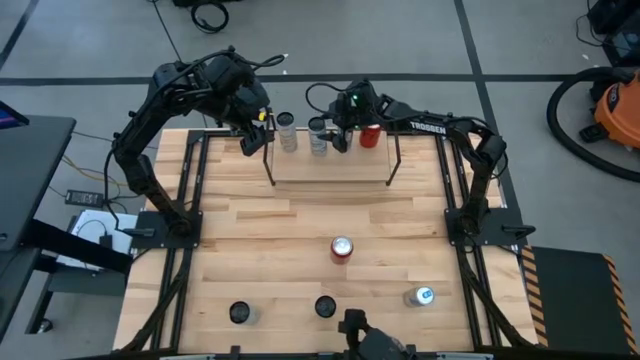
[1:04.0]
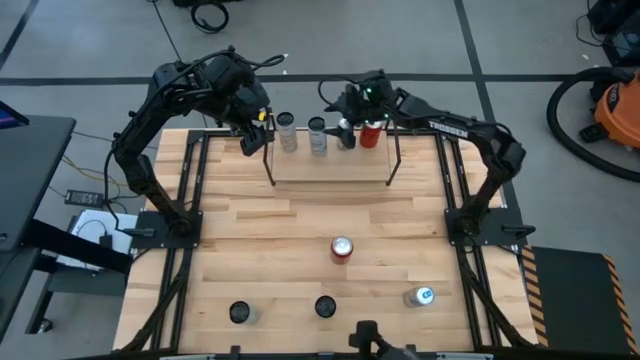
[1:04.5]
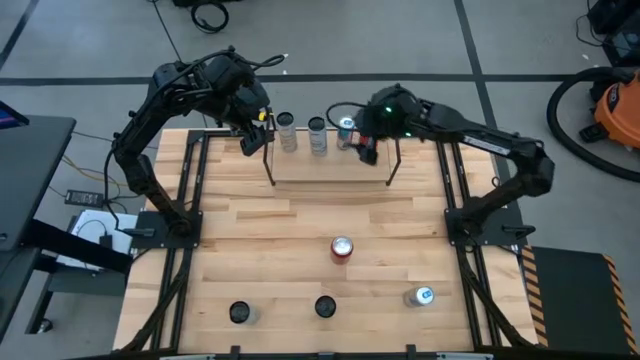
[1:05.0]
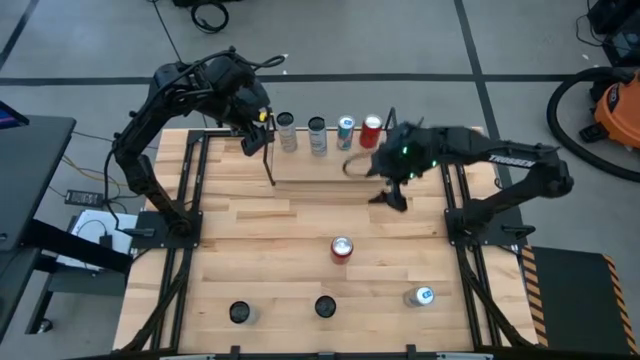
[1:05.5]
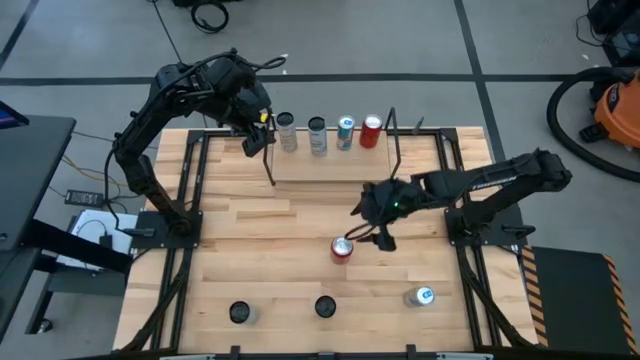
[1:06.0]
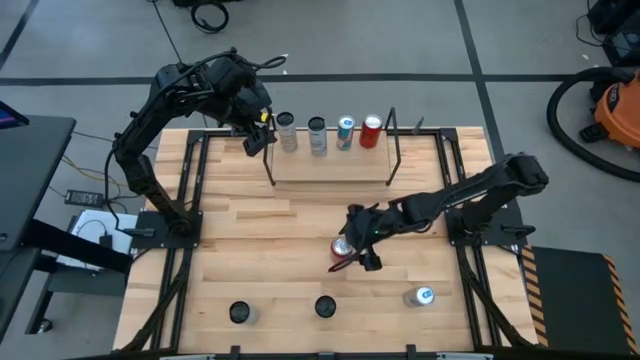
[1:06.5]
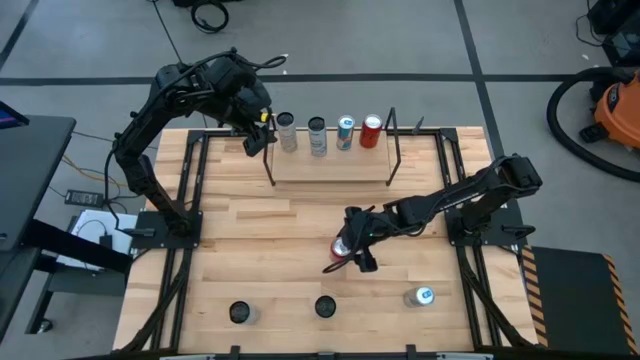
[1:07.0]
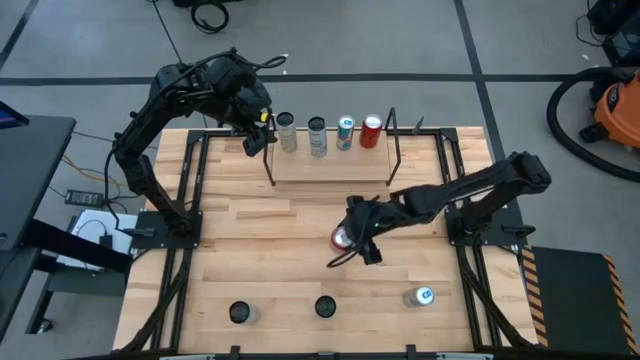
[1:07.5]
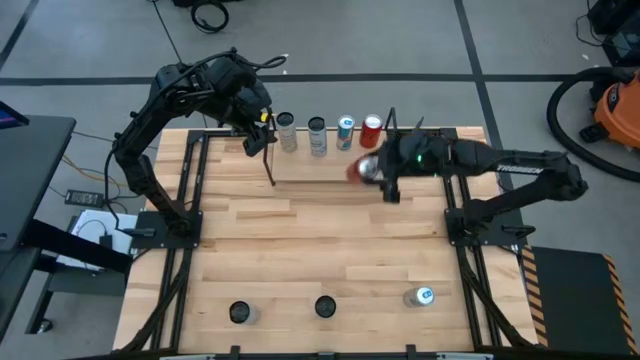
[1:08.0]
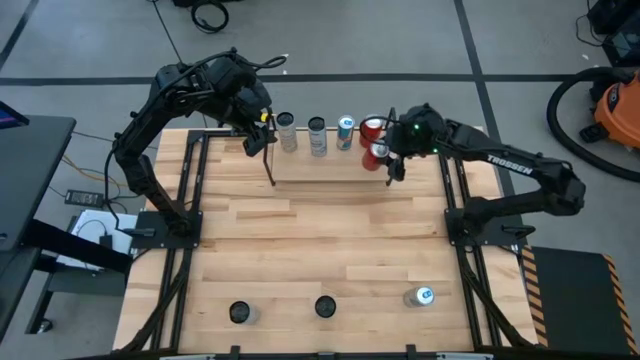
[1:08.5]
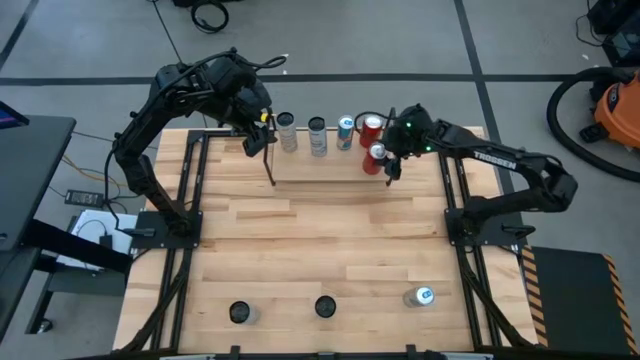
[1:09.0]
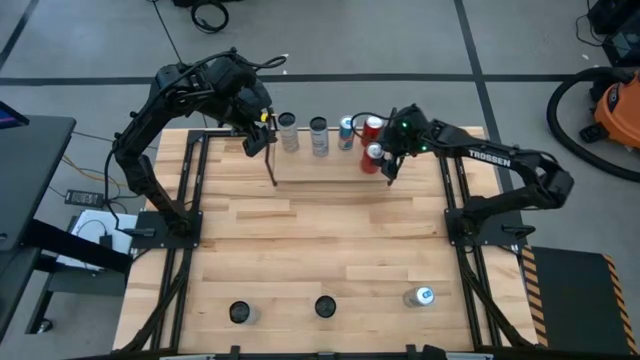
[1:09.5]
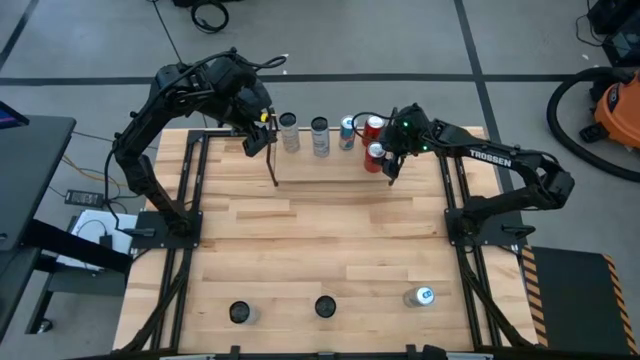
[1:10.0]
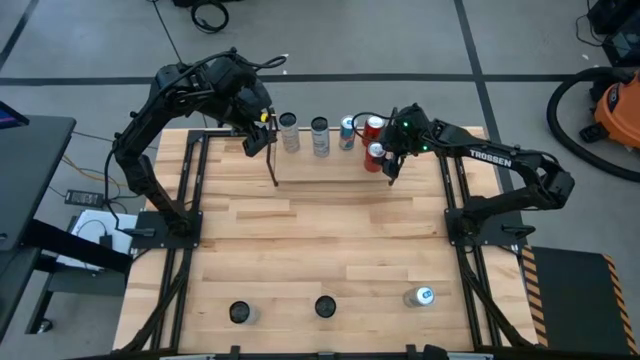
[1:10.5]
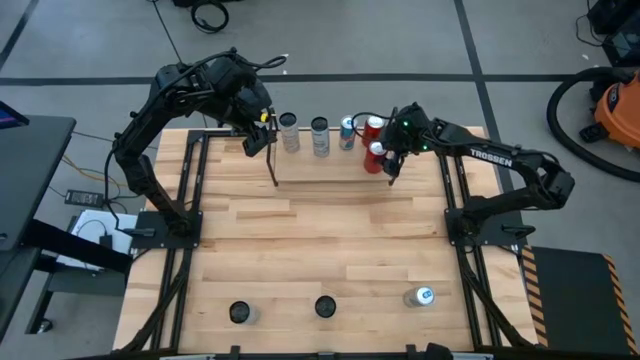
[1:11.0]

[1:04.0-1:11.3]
Task: Place canned beverage on shelf
Put the red soda can on the shelf aligned with the red can

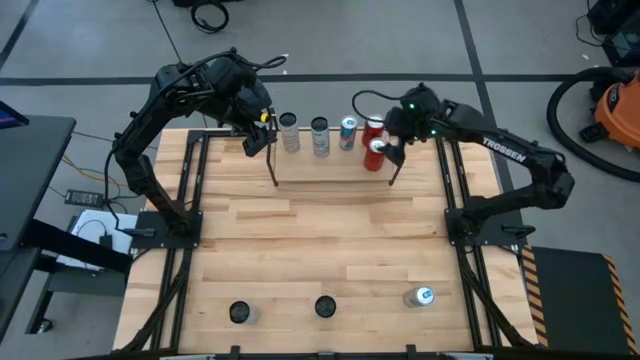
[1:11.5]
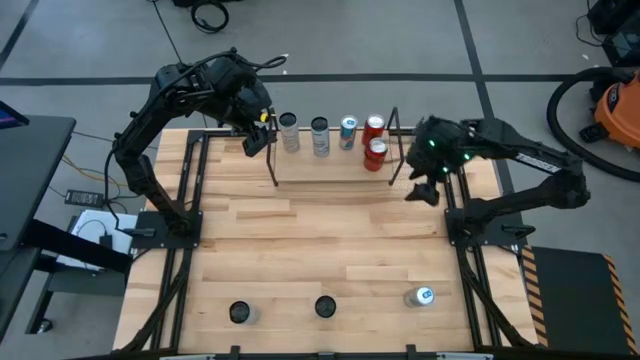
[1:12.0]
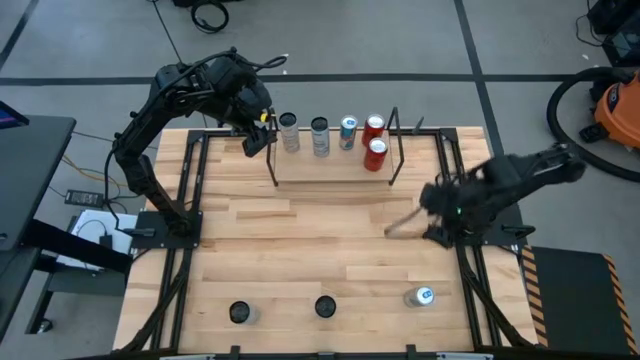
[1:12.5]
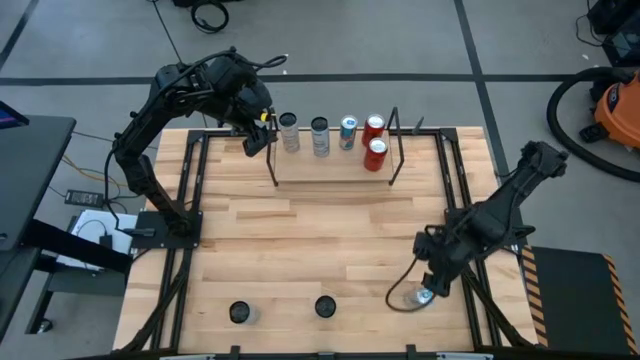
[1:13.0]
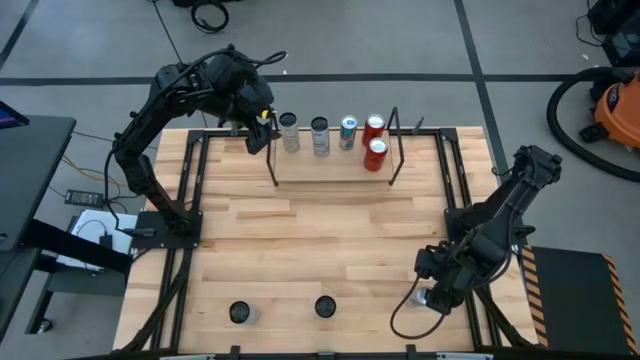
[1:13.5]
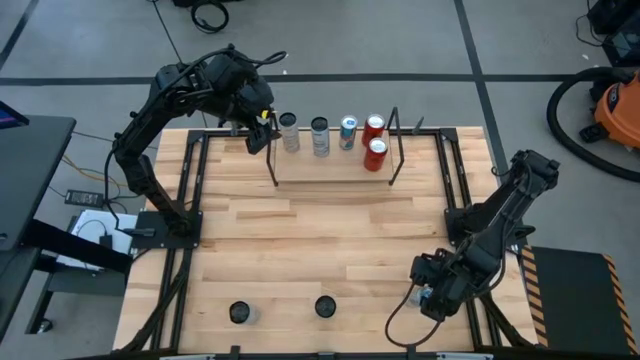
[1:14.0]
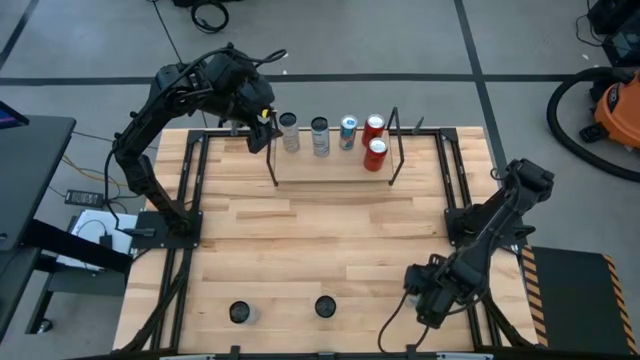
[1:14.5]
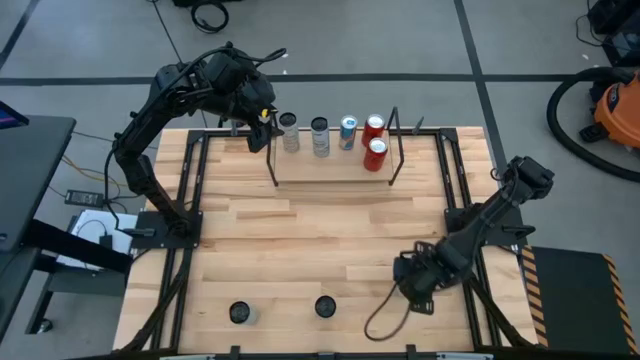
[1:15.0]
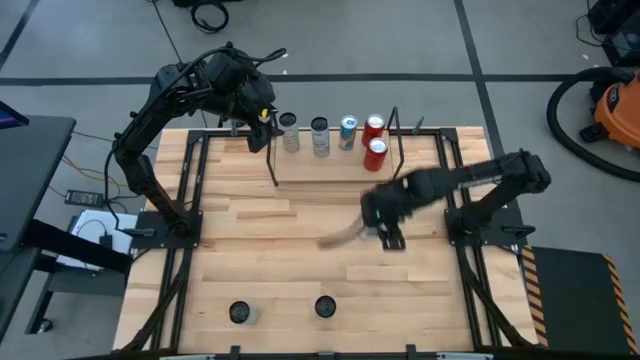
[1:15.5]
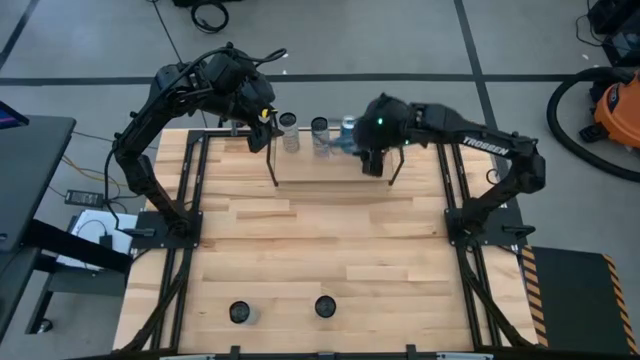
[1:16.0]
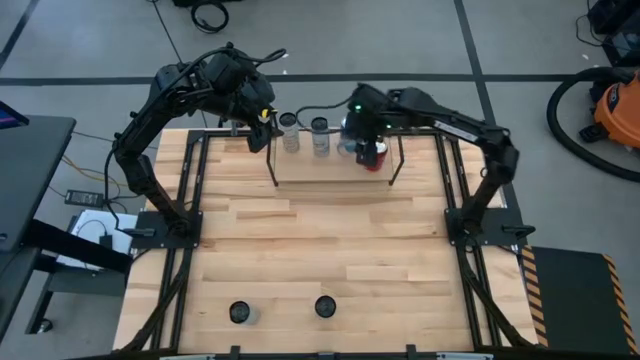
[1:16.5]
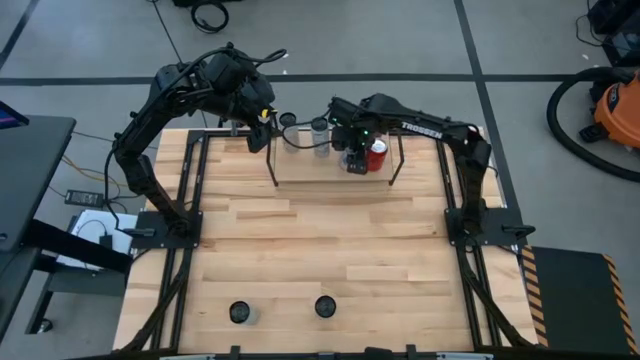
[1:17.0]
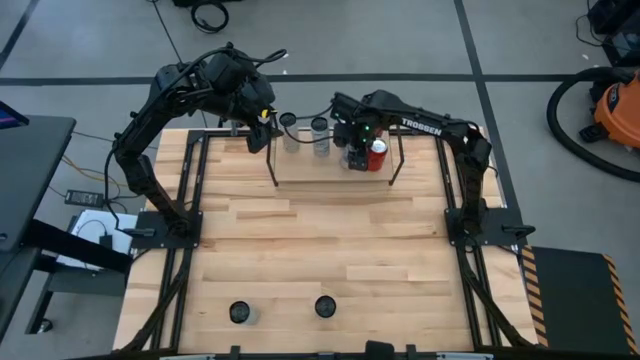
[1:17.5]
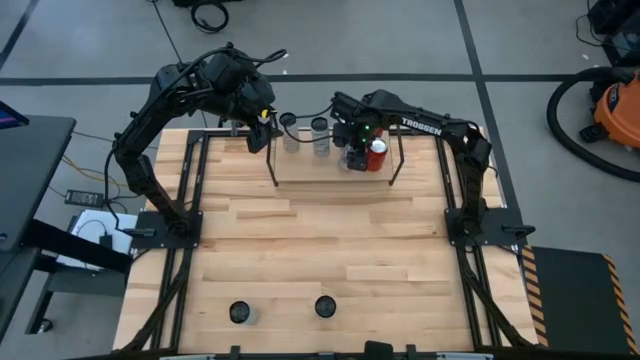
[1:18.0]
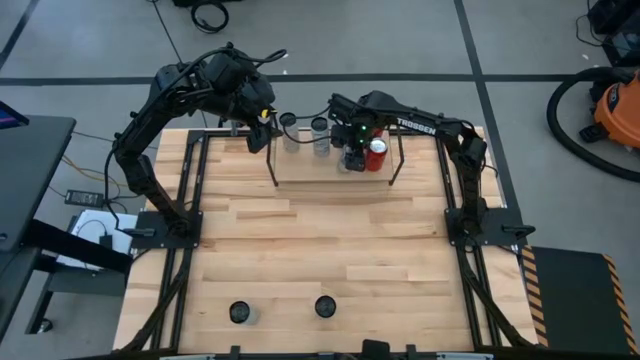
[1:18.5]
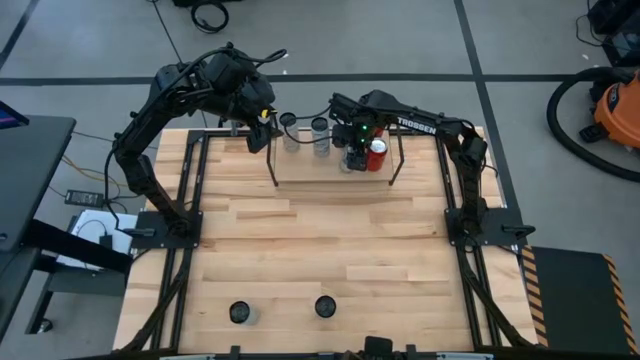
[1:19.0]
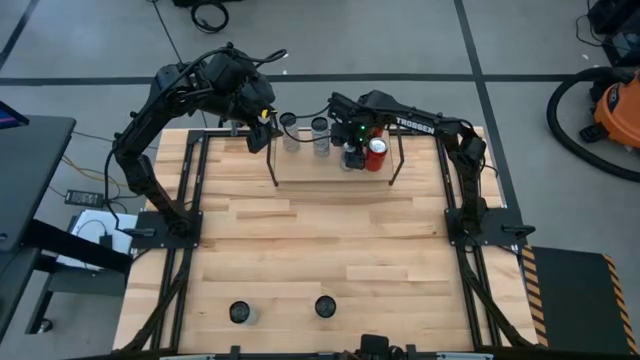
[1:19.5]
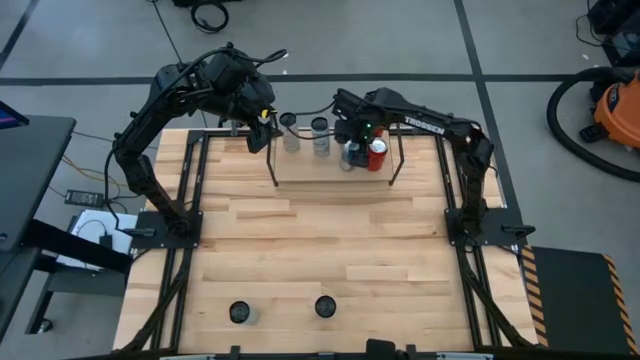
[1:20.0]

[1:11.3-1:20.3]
Put the blue soda can on the shelf aligned with the blue soda can

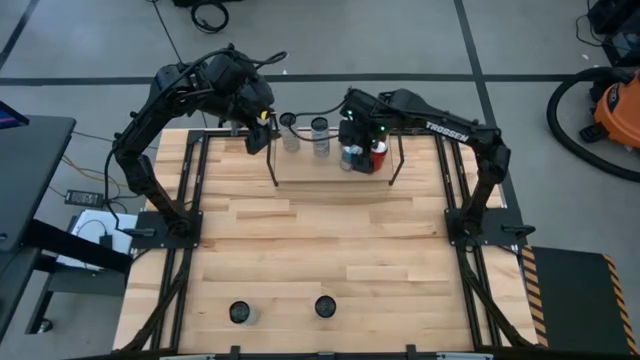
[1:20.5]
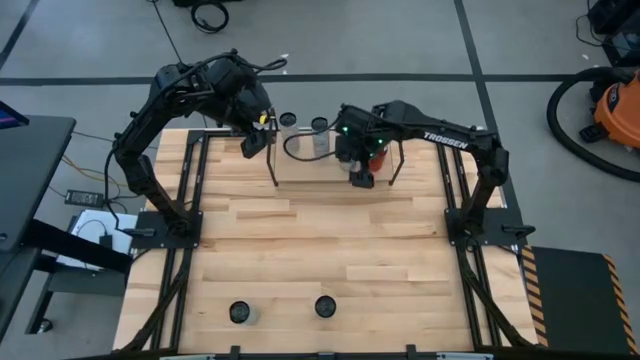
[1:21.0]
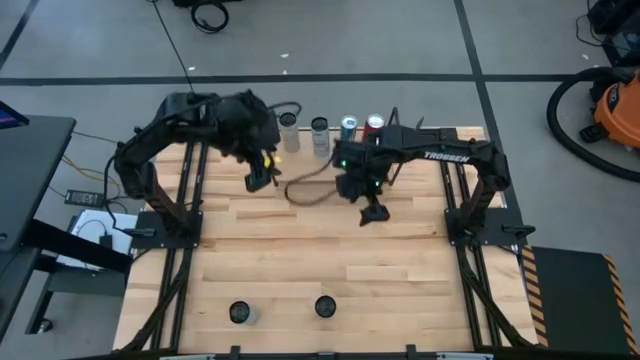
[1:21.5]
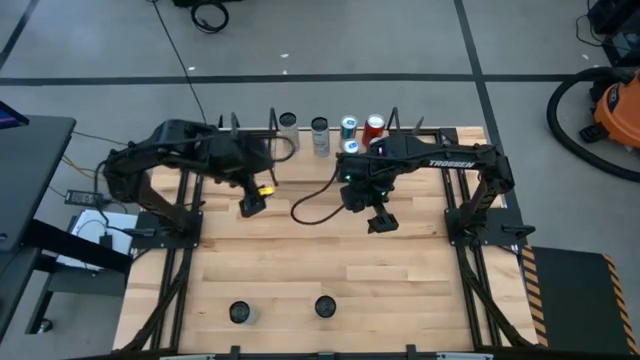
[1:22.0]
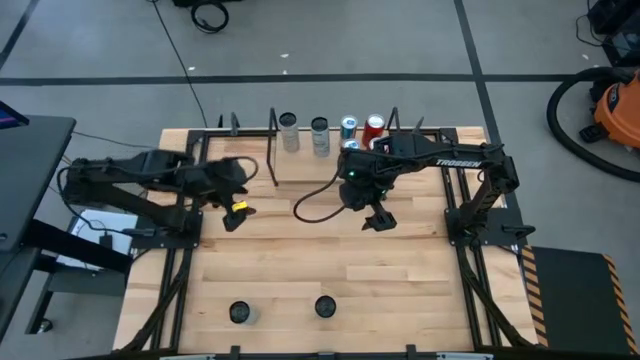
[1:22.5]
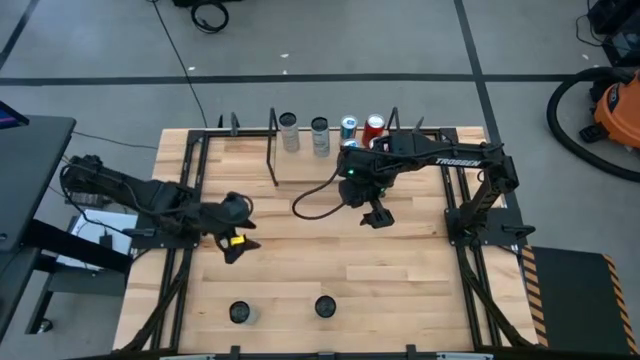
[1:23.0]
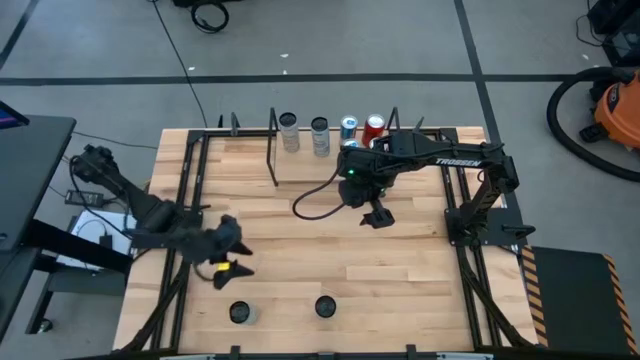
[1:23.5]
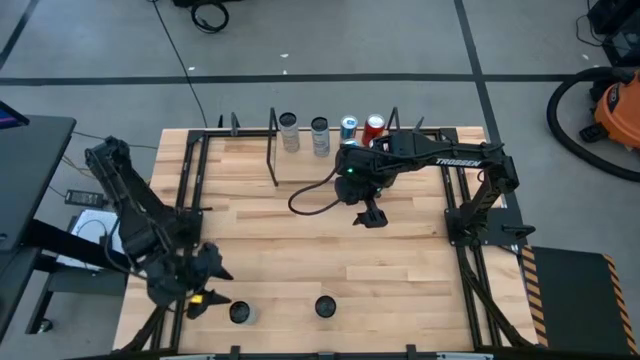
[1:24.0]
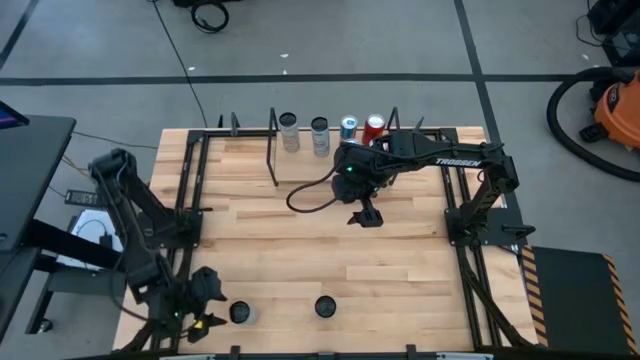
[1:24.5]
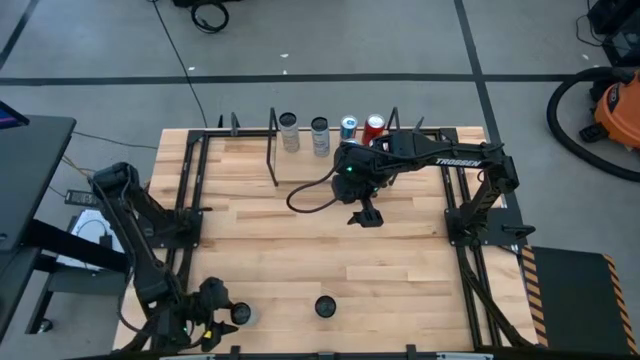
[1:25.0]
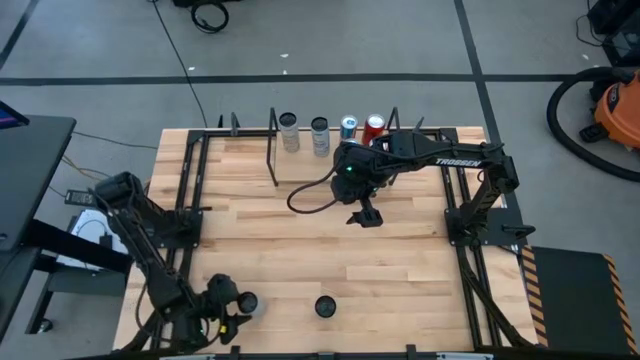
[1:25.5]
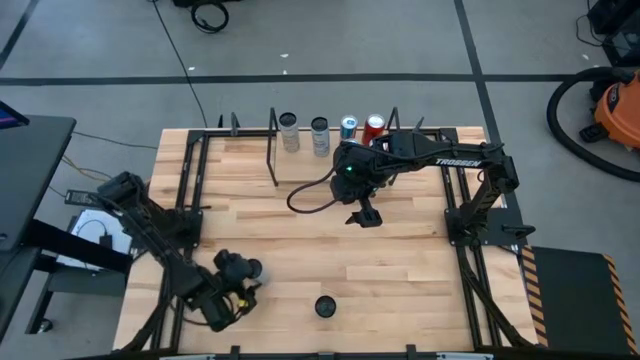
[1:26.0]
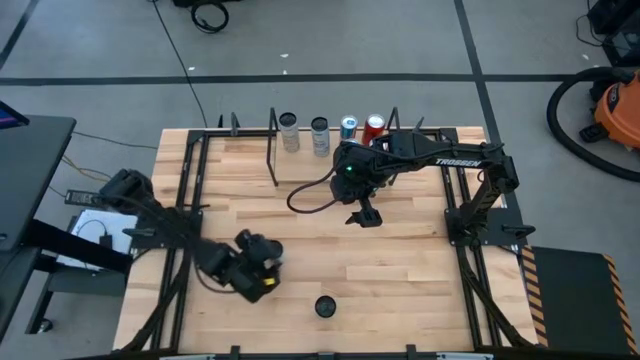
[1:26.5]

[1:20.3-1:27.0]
Put the white blue soda can on the shelf aligned with the white blue soda can
